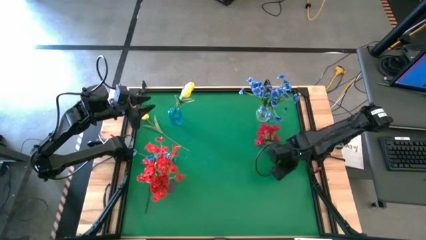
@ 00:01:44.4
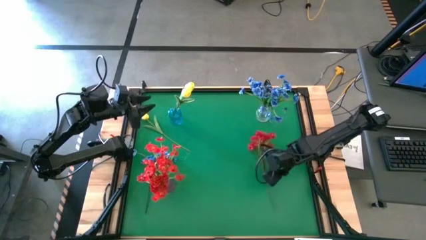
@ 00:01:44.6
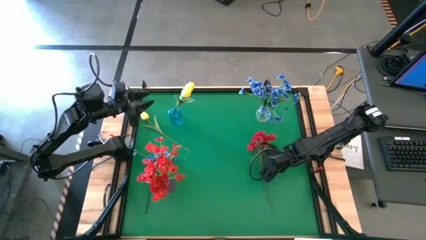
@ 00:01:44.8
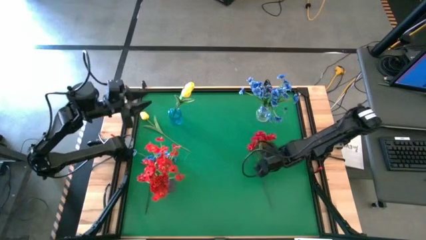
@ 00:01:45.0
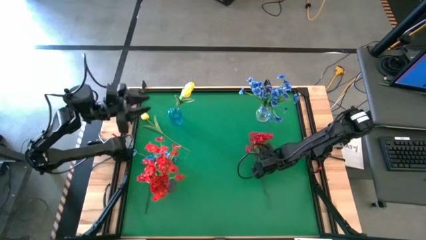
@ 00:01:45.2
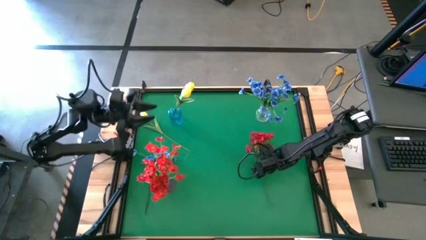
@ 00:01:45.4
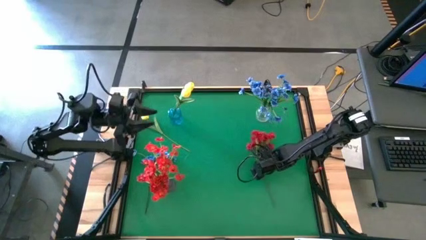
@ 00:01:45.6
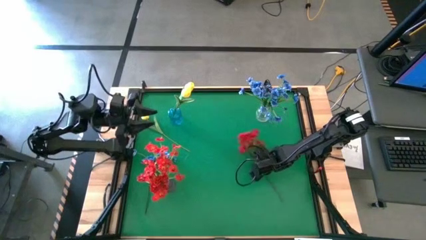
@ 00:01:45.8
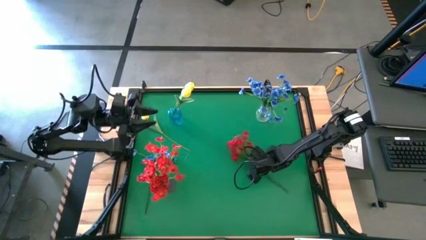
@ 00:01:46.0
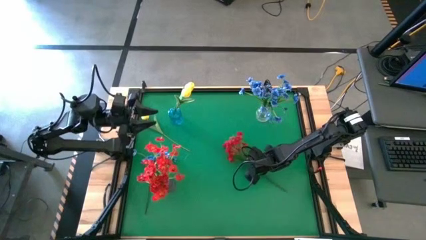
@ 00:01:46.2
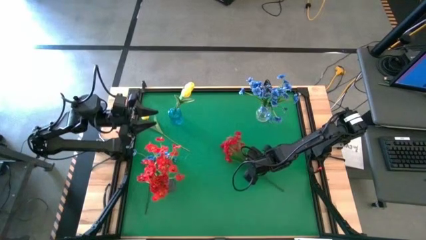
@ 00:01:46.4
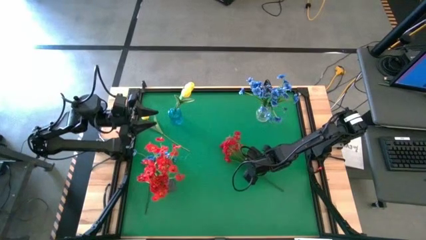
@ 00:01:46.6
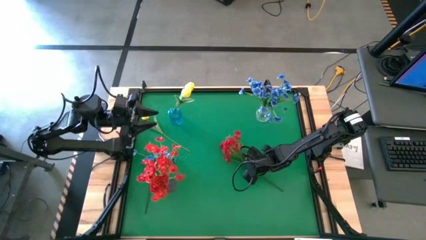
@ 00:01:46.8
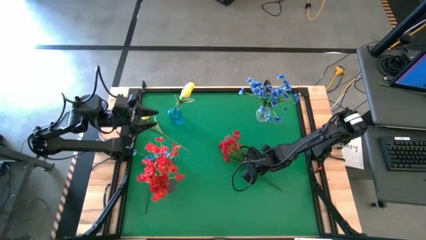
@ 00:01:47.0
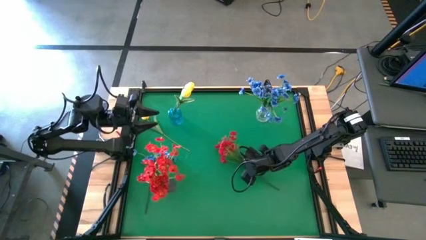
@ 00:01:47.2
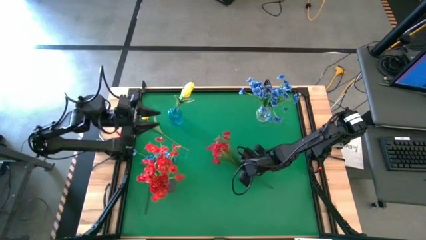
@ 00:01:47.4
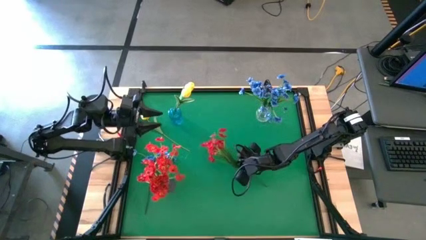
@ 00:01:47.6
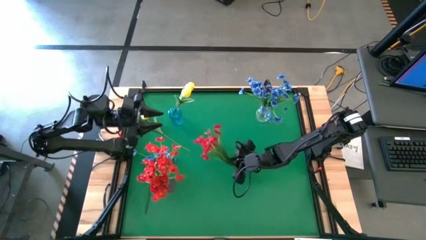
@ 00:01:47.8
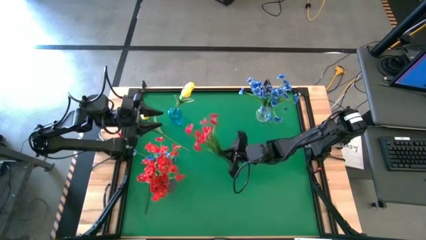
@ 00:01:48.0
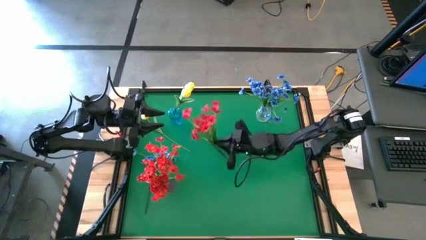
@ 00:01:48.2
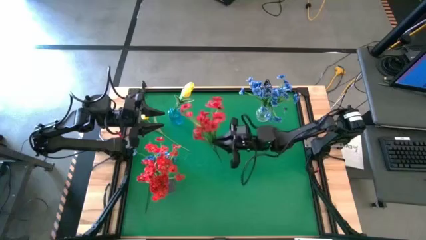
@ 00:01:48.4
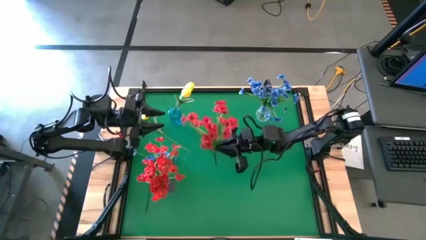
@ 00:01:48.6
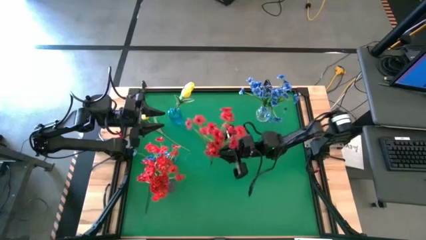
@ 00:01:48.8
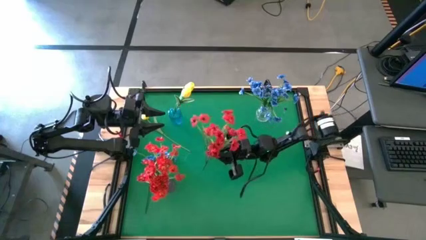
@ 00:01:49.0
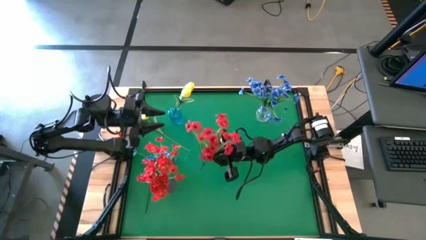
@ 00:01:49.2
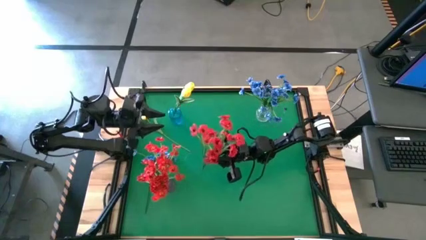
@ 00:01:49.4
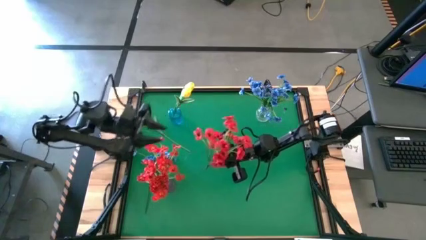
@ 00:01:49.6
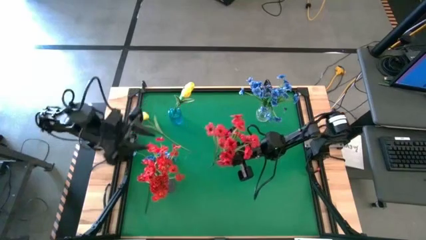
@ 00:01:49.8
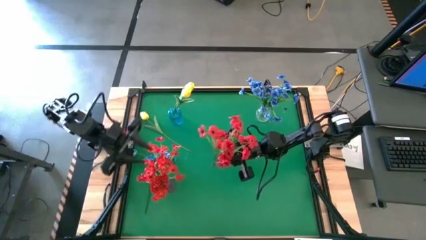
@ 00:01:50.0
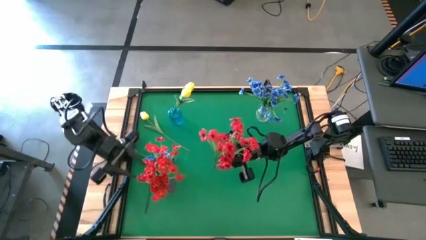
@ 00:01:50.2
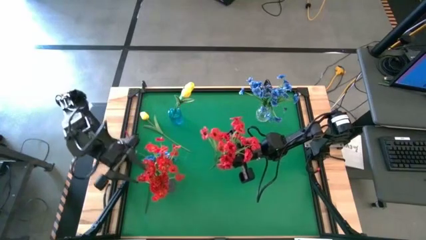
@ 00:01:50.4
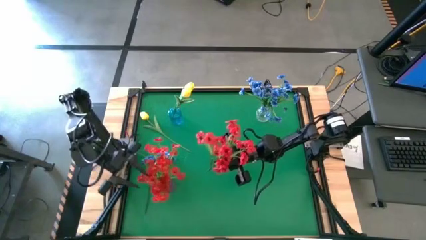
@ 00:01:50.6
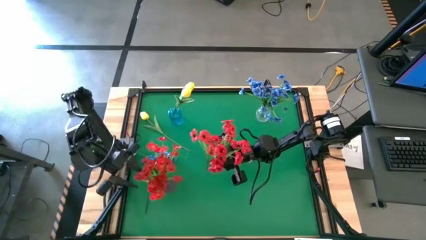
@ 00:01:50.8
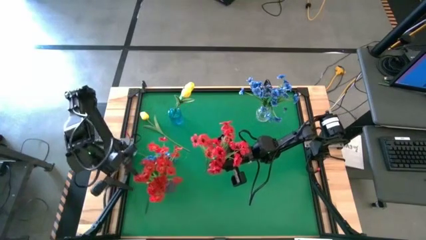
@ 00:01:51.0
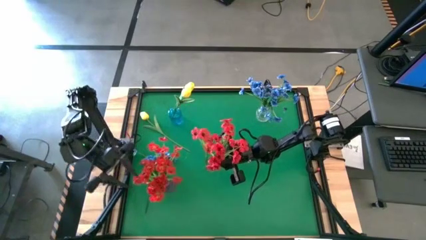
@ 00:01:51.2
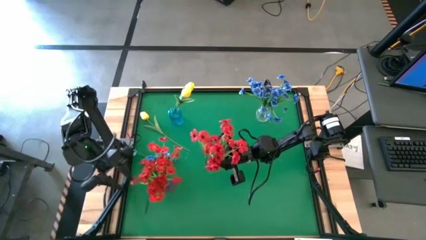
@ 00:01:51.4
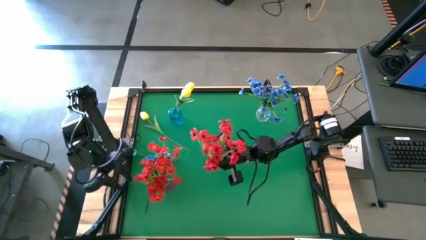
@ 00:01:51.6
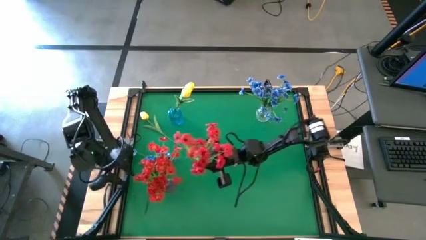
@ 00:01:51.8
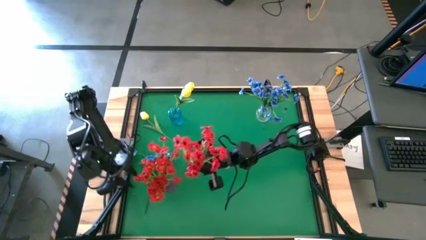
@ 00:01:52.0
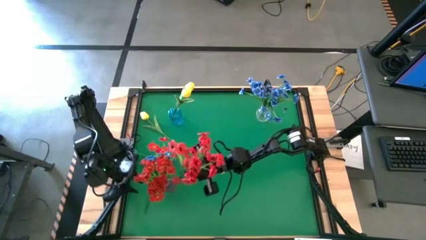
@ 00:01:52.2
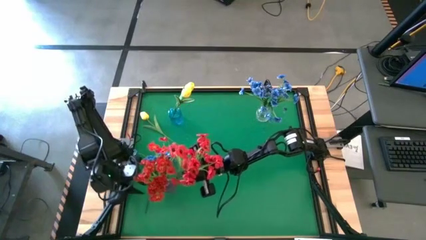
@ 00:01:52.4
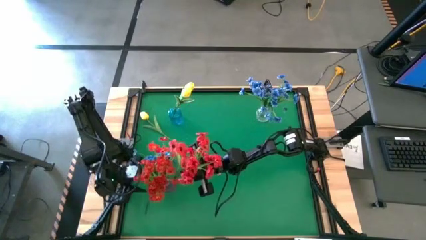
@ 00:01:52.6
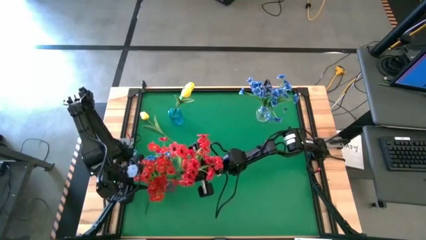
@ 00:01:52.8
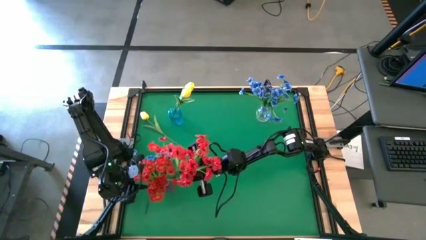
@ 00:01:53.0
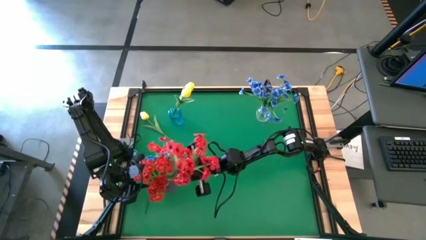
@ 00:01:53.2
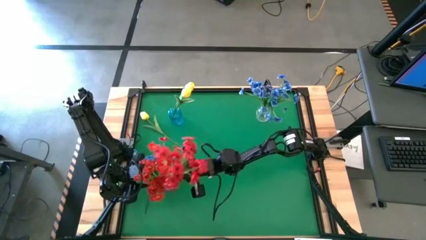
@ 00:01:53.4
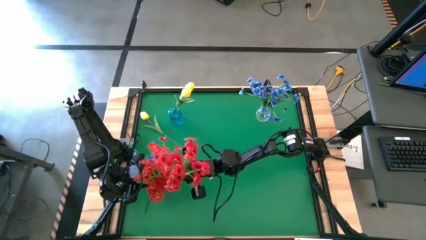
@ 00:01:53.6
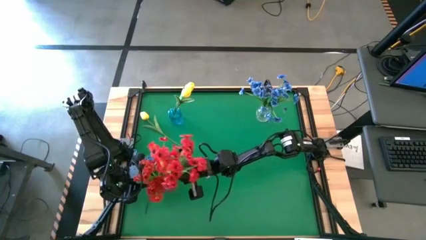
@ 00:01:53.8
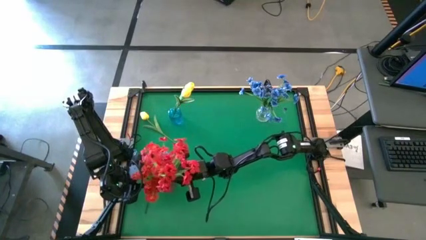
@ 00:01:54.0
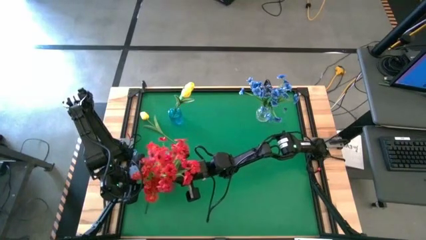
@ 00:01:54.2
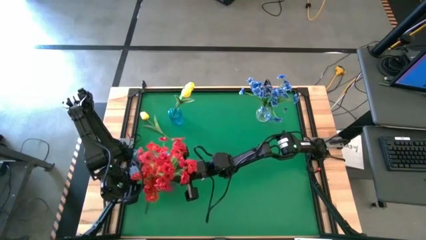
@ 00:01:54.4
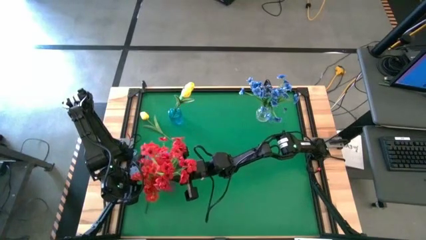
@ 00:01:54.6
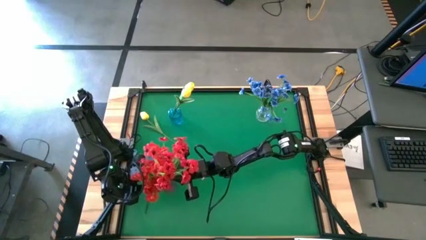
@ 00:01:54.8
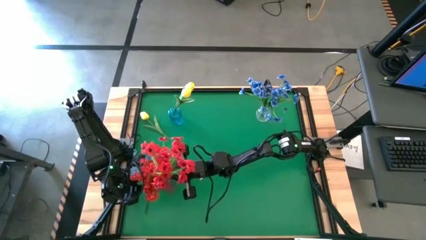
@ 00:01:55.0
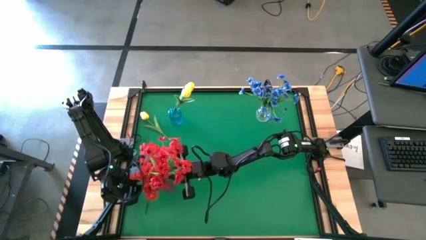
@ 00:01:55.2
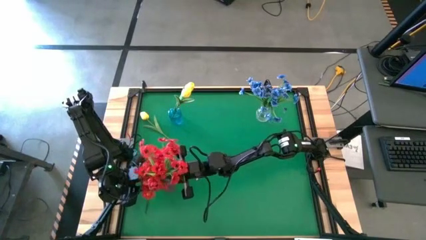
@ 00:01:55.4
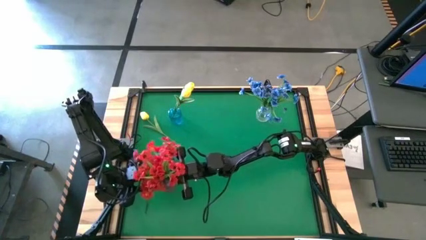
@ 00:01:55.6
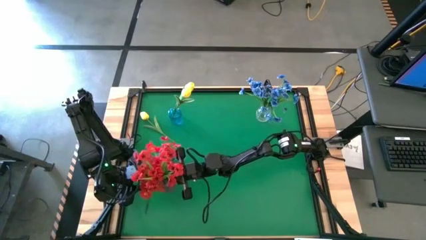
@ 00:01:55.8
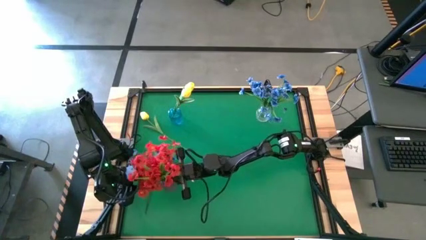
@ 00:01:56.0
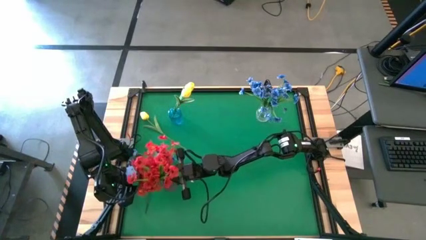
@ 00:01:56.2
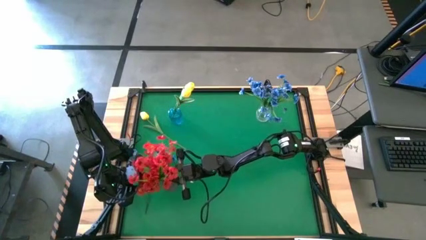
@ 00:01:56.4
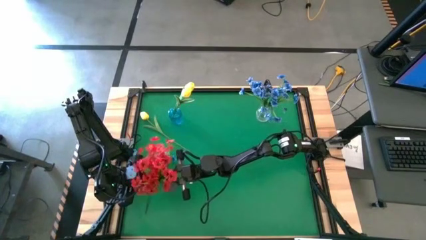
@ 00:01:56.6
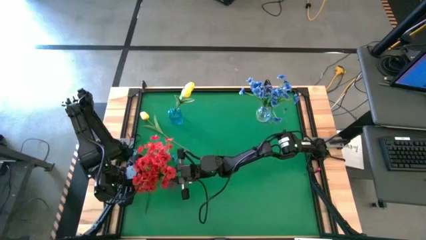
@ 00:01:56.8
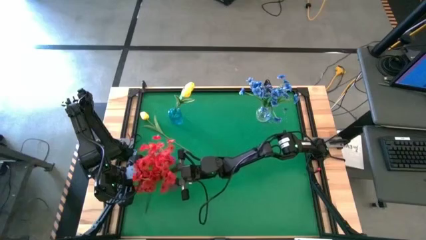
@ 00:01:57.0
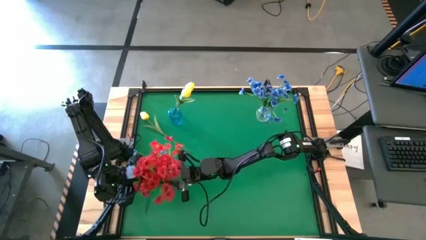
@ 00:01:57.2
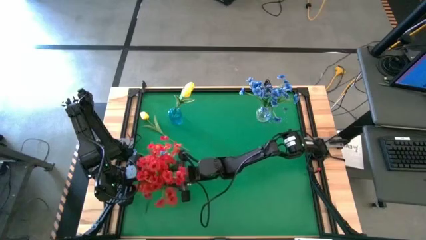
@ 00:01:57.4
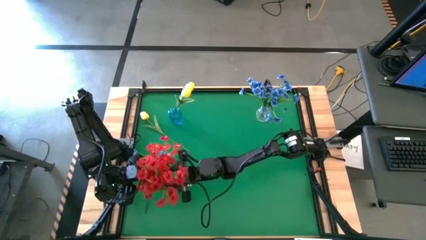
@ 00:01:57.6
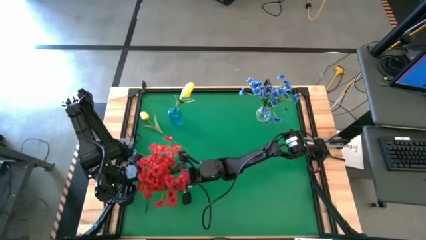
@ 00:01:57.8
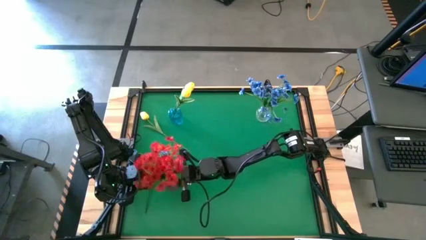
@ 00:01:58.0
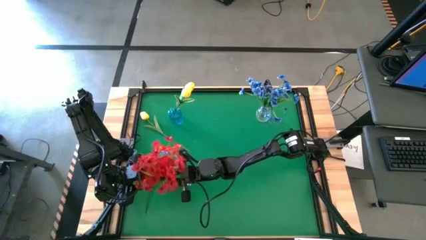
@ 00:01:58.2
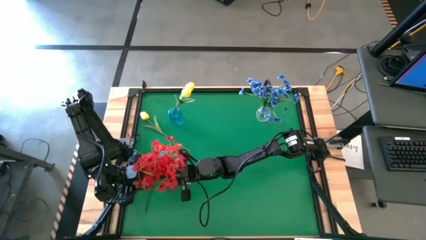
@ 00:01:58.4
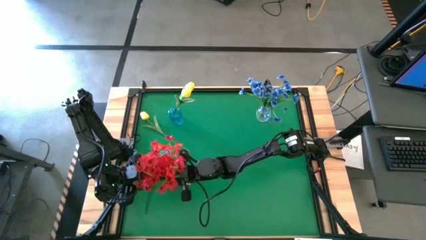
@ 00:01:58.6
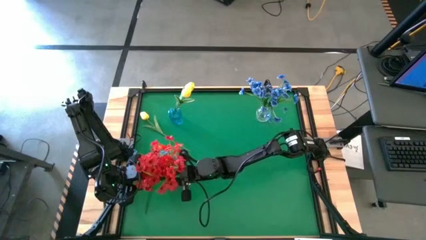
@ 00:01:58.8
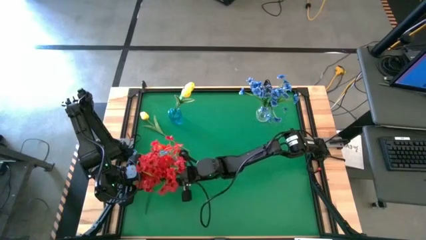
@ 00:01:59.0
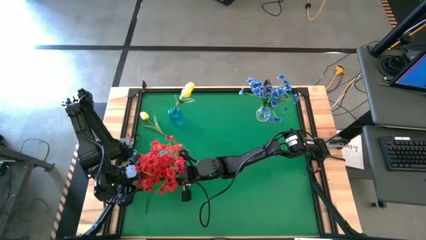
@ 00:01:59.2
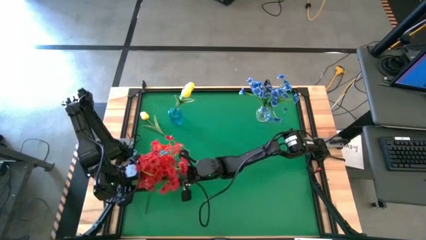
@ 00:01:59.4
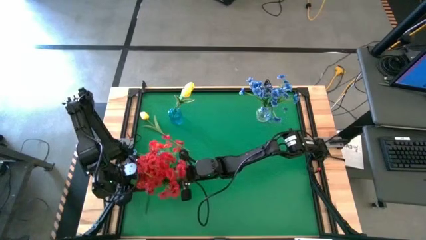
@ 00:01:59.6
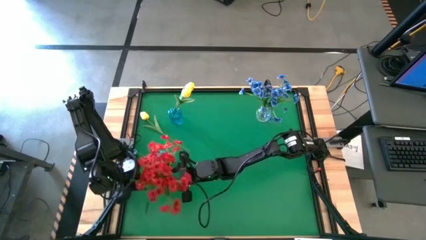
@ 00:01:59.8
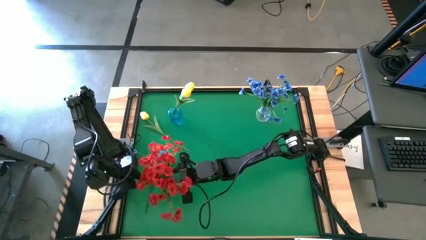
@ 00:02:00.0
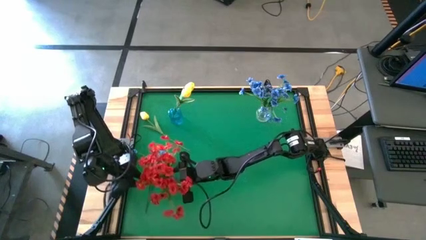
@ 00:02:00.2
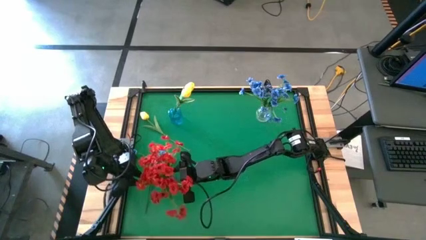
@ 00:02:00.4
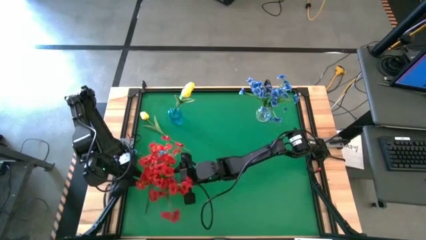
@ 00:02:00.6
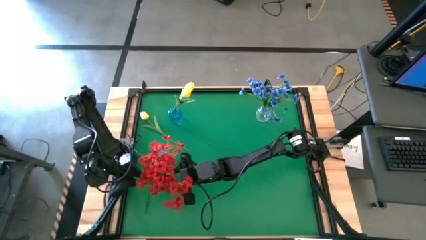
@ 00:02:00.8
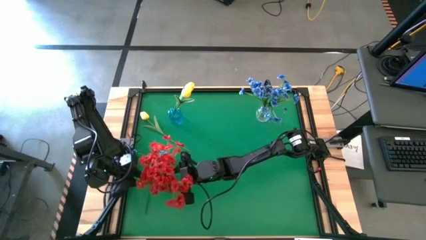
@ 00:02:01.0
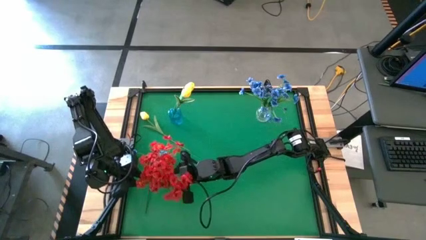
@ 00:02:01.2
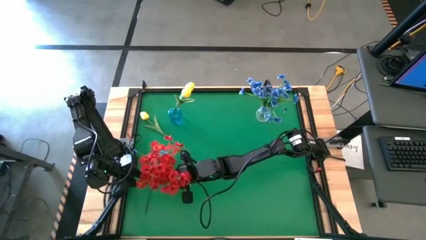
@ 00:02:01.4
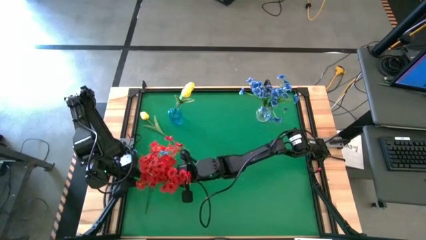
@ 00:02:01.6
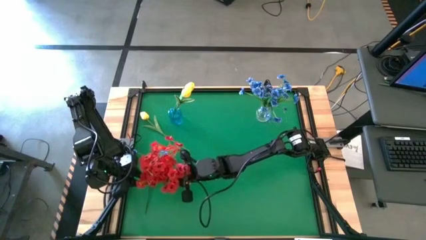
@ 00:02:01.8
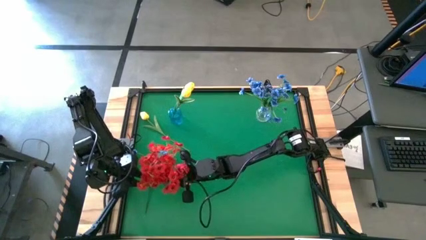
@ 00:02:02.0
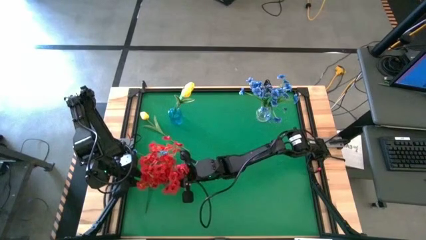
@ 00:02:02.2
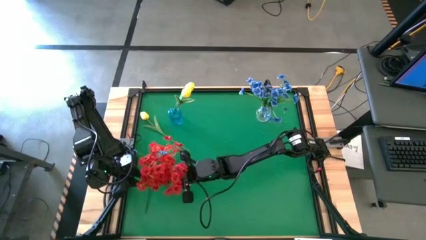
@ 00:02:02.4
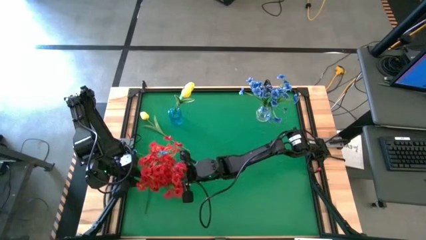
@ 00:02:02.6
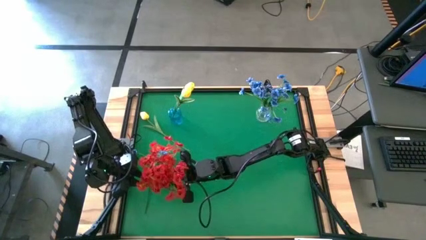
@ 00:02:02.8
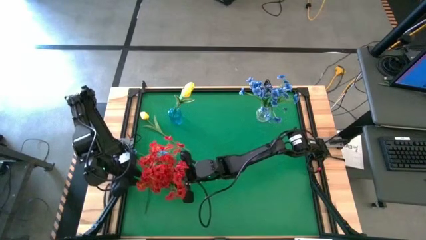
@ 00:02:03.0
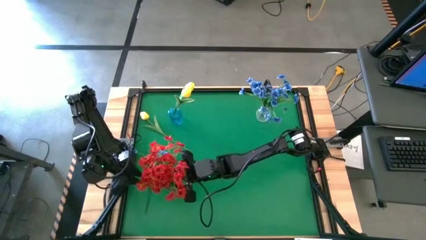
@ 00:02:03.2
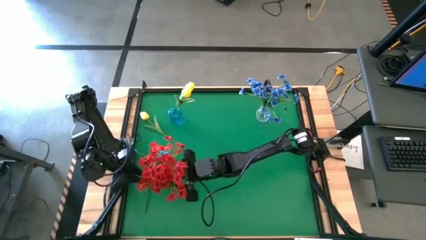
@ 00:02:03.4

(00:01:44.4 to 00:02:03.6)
Task: Sort flowers into vase by color
Put the red flowers into the purple vase
